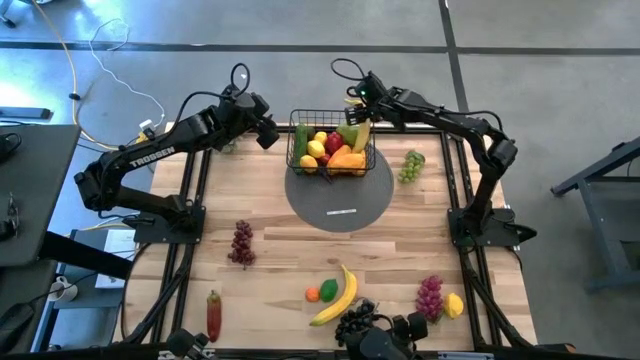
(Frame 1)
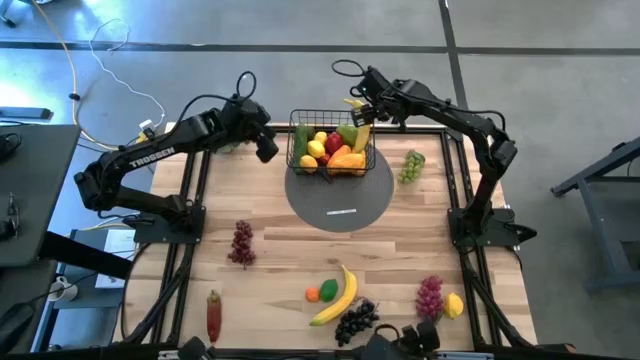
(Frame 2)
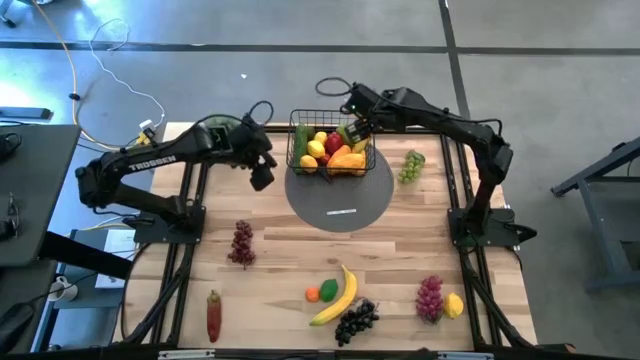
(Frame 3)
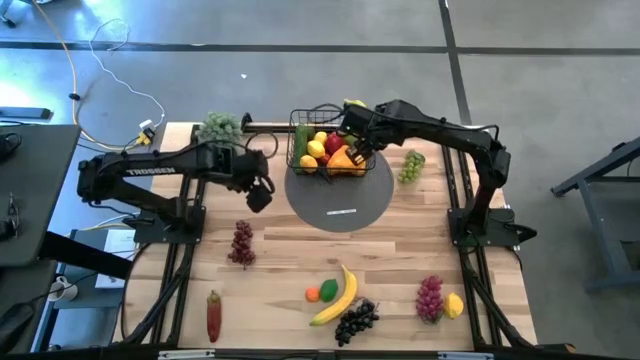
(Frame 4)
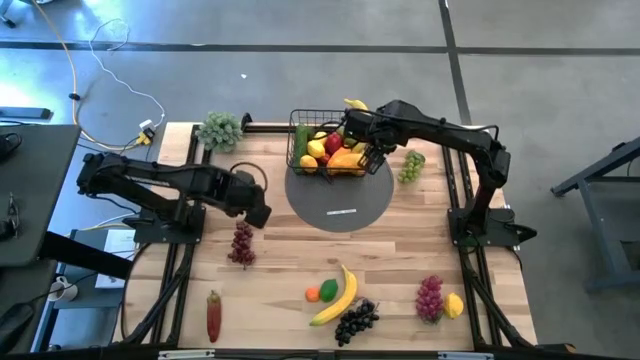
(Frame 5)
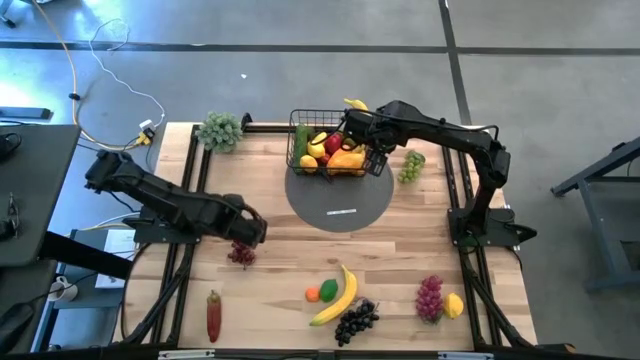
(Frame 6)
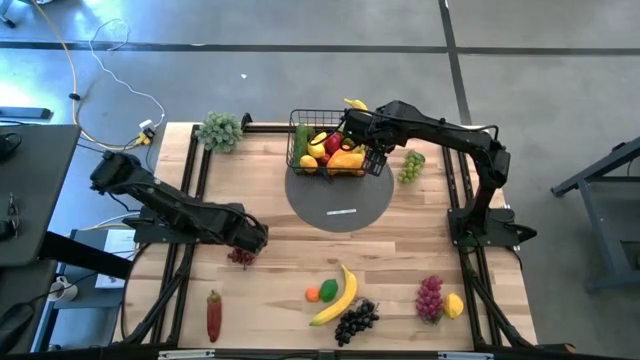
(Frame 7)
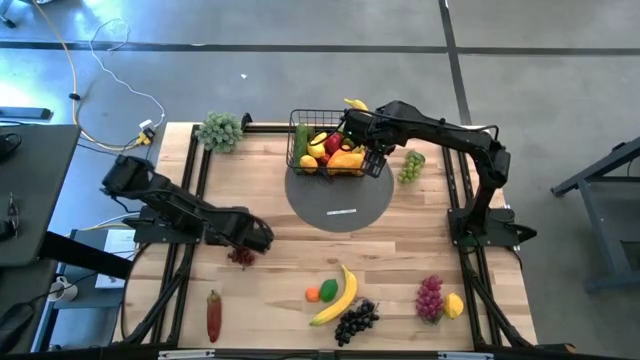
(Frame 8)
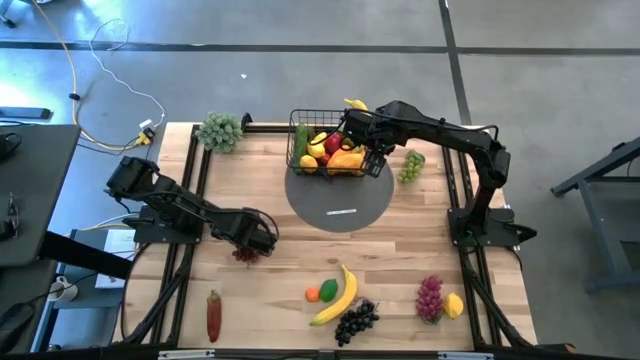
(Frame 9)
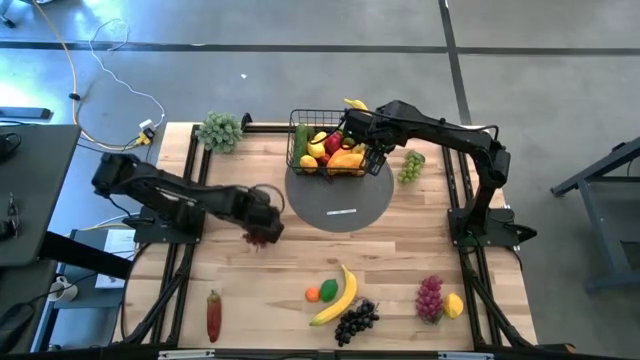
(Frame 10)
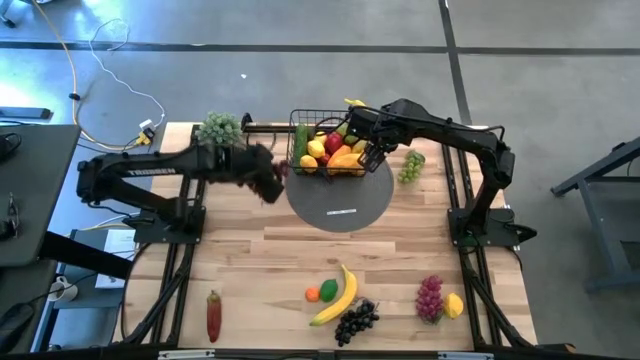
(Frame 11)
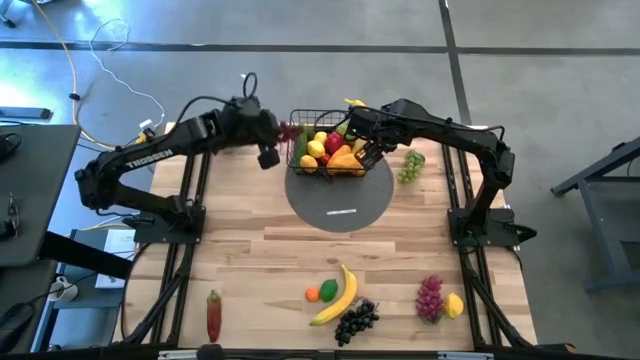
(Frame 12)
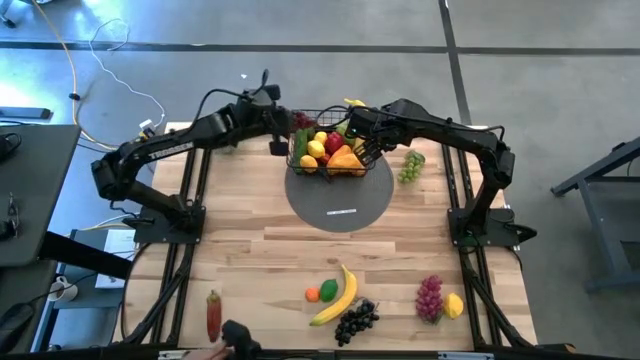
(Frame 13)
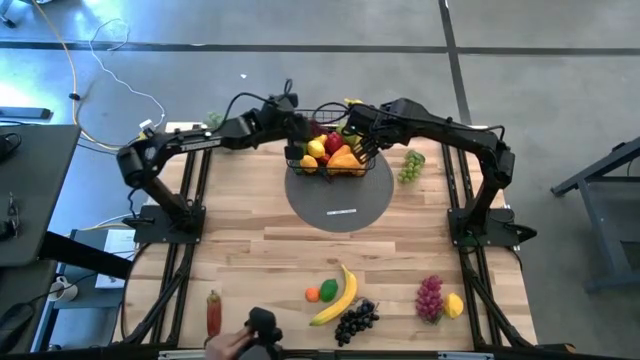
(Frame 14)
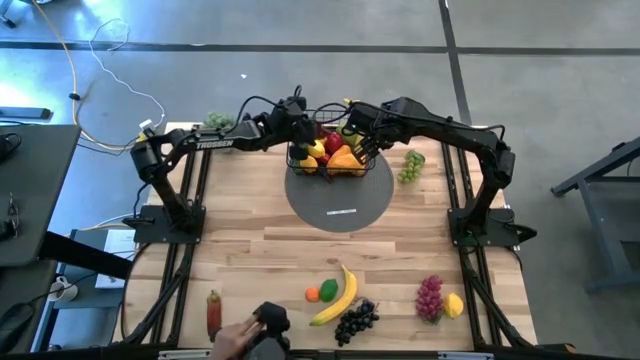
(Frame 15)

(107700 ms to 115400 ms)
Task: Build produce basket
Put the grapes into the wire basket

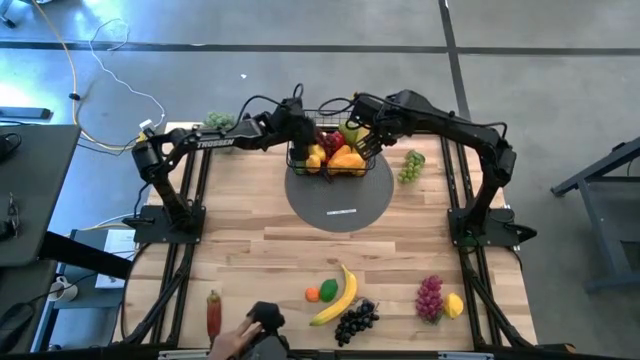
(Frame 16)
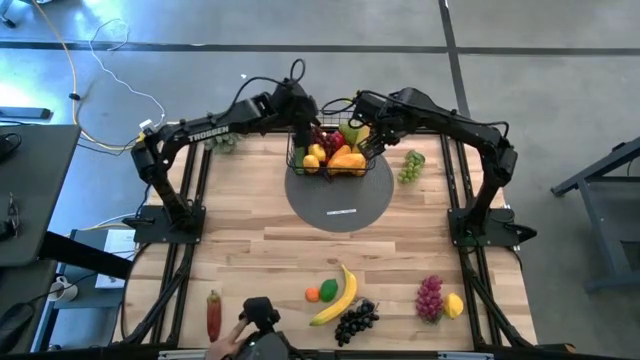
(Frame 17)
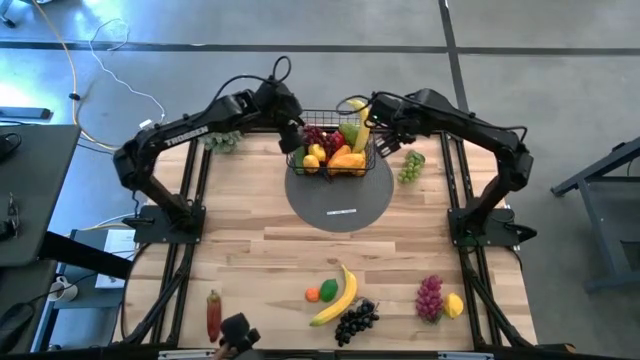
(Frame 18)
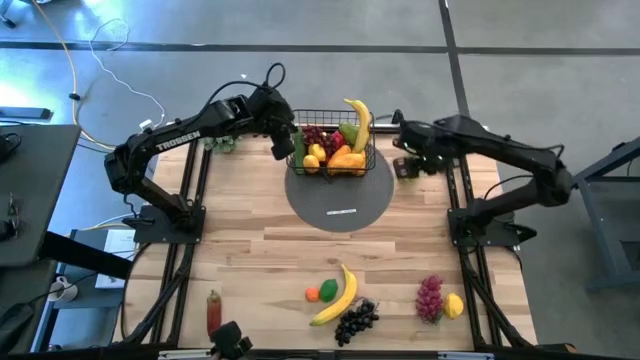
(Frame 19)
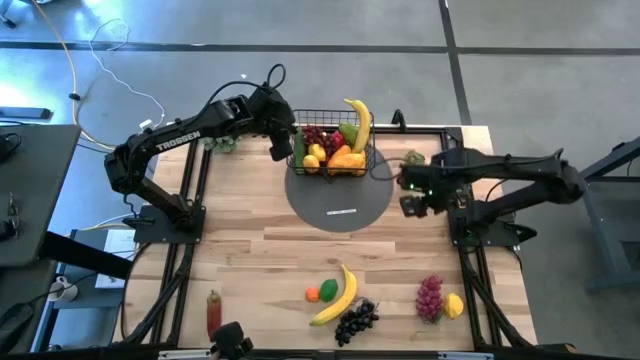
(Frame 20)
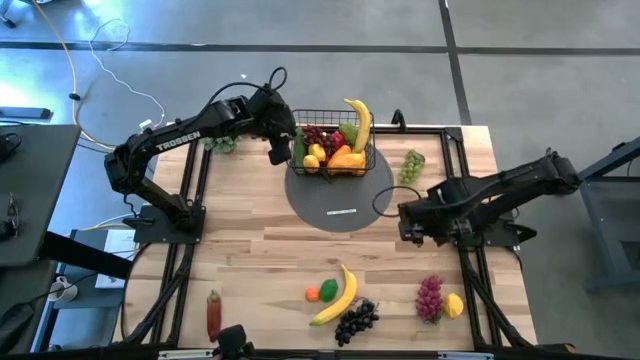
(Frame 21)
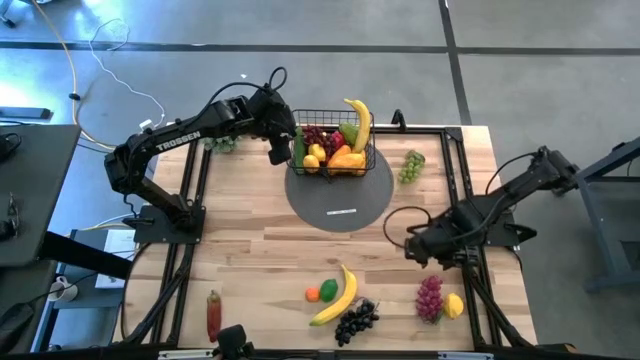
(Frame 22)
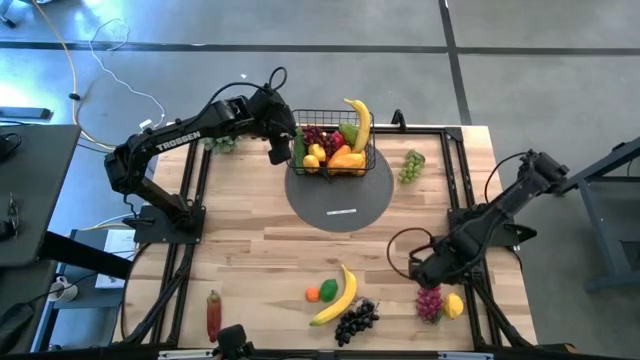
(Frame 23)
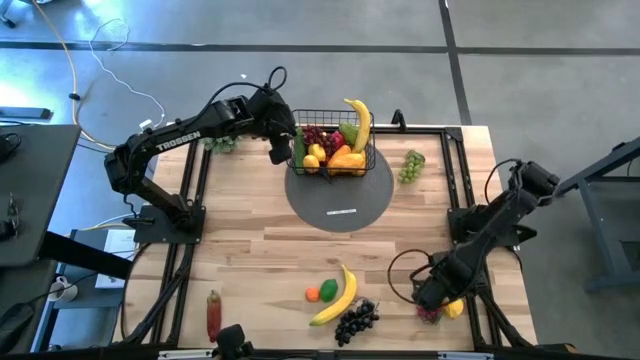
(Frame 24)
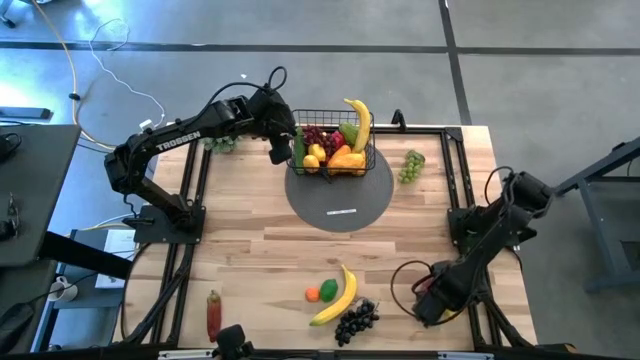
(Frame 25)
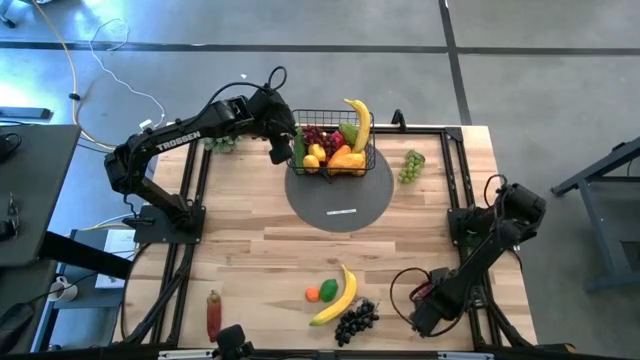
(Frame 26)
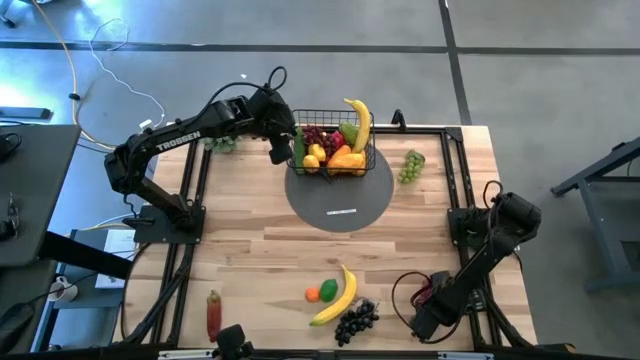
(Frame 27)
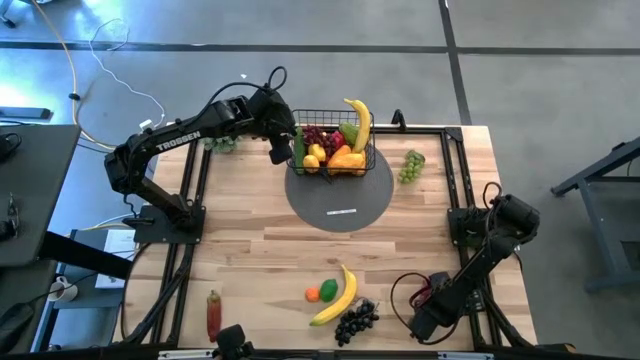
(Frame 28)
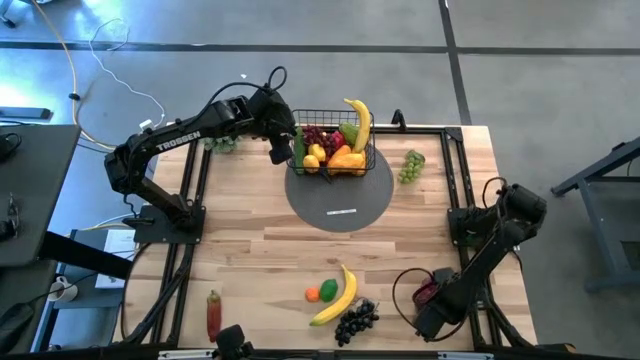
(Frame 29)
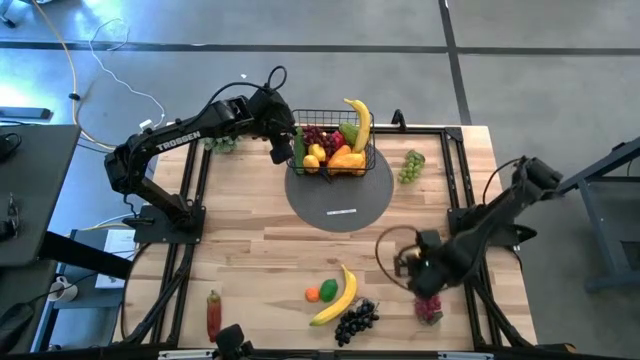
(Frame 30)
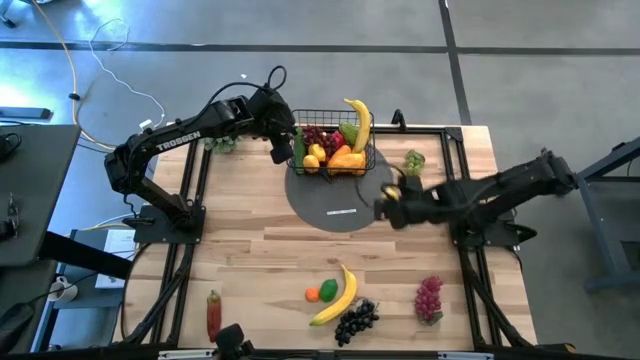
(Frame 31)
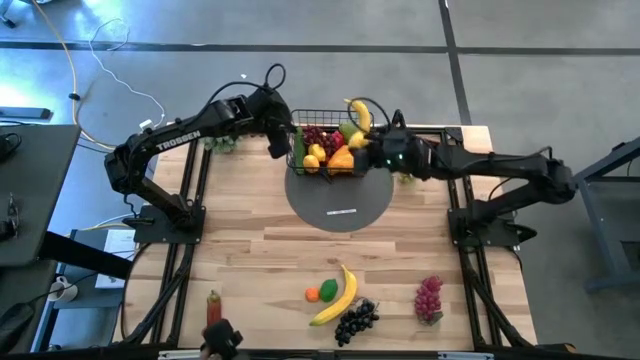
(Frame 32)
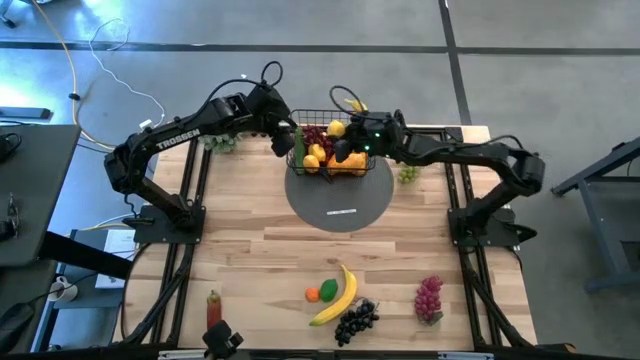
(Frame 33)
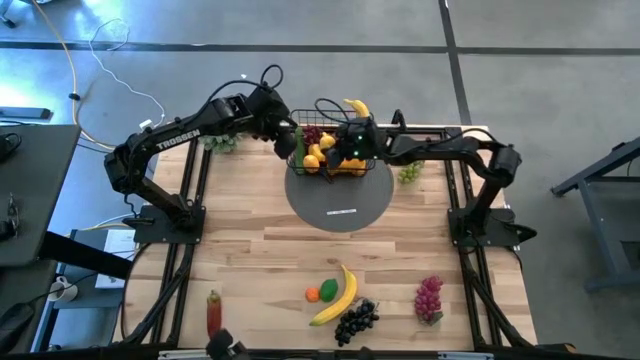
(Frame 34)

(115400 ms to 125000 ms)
Put the lemon into the wire basket

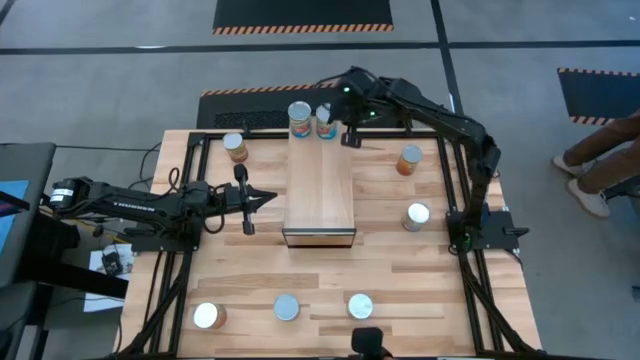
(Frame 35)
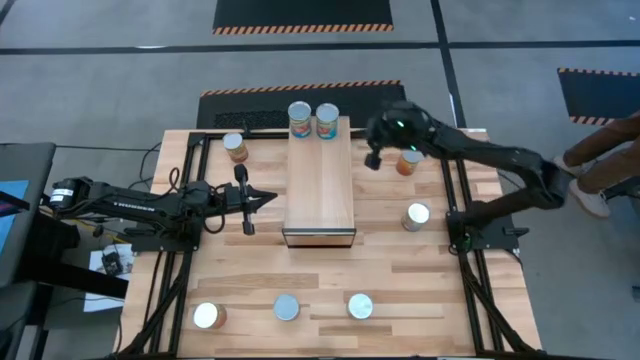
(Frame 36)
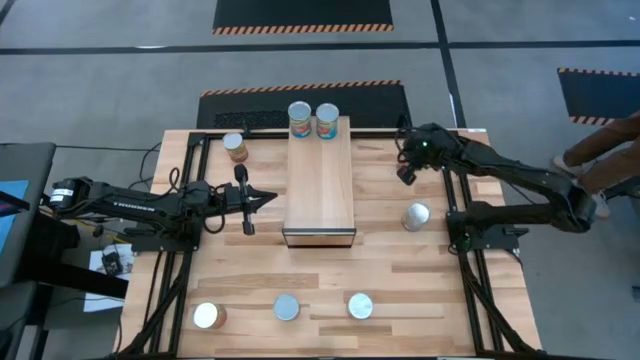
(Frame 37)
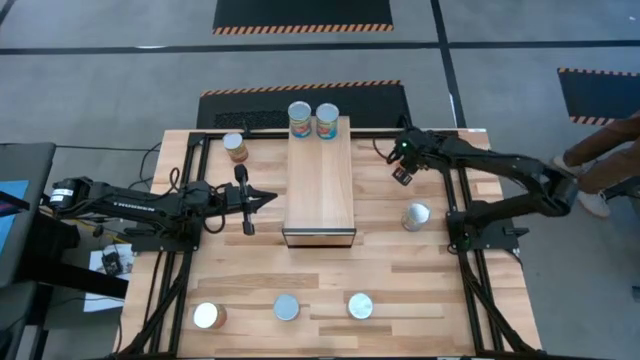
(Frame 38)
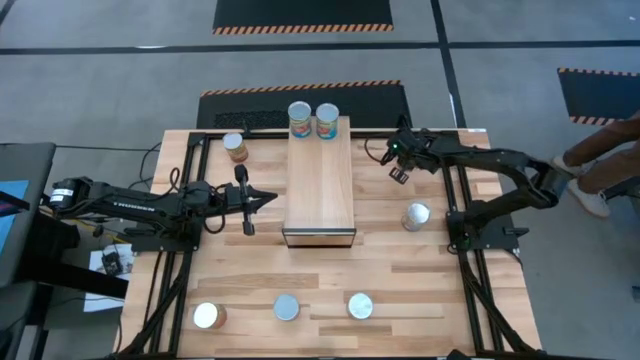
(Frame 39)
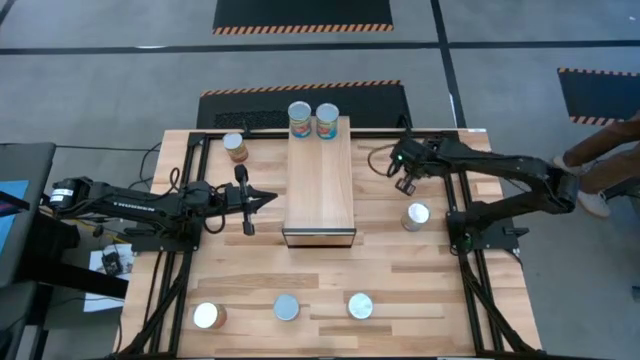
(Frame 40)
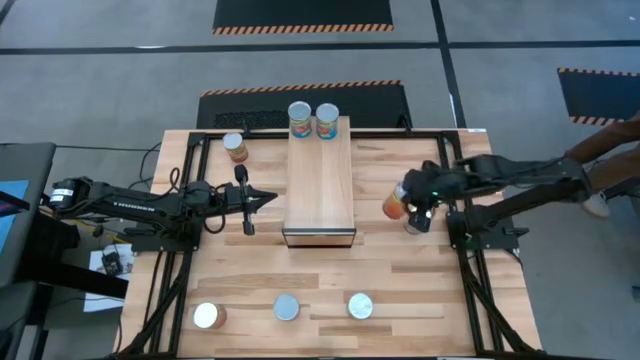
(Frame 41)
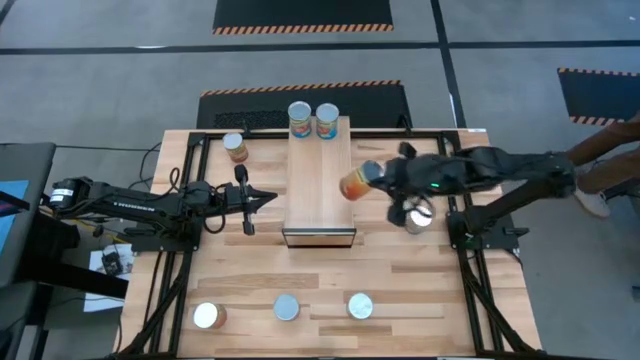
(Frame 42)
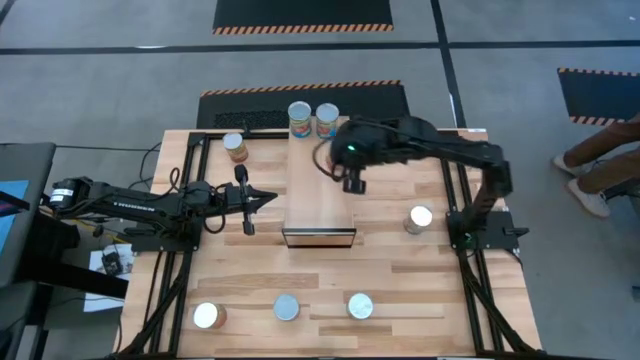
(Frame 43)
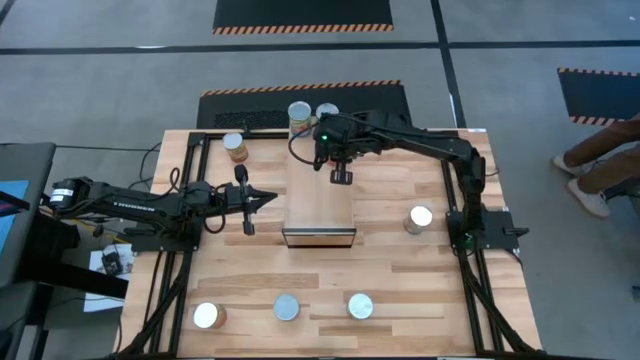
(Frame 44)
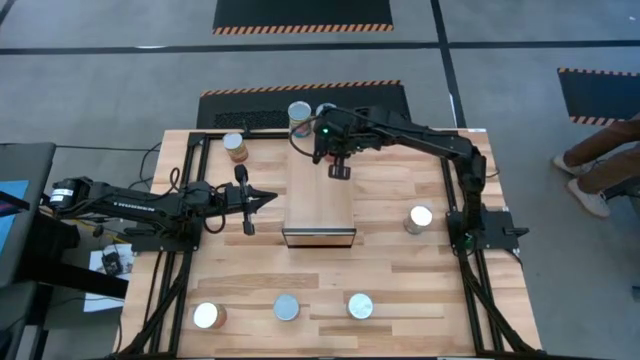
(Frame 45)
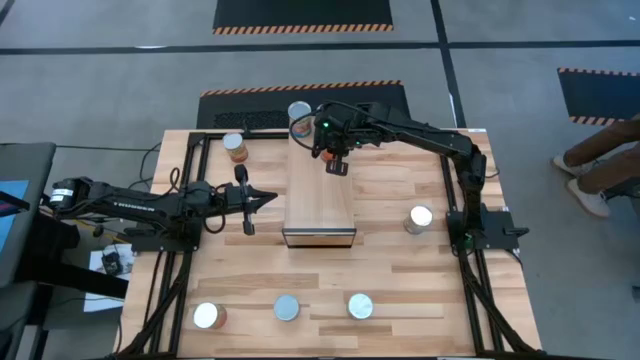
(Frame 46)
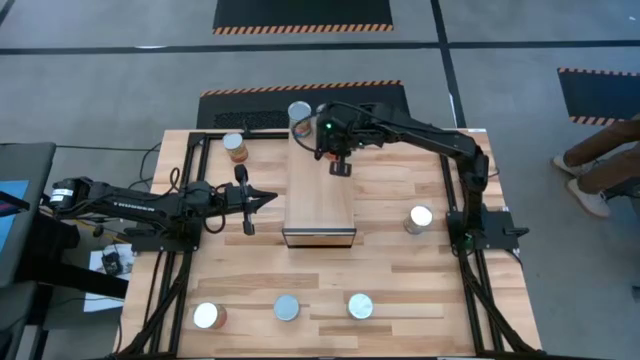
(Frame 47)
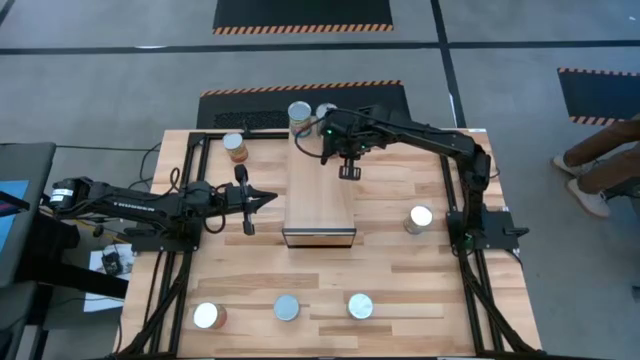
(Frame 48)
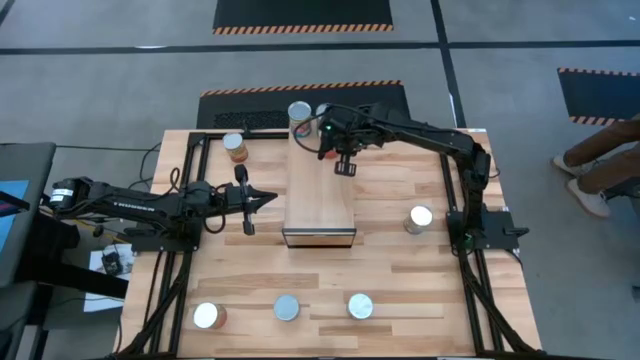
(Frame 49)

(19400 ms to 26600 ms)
Task: Pick and place cans onto a shelf
Put the top canned green beans on the shelf
